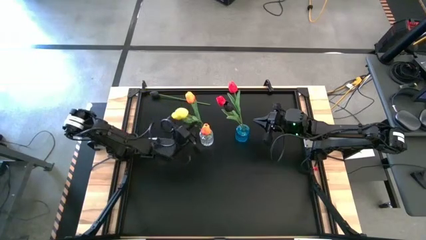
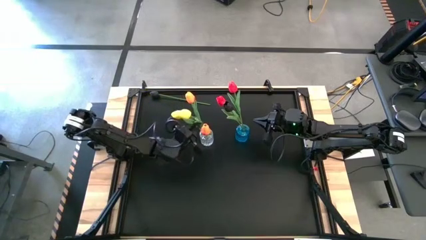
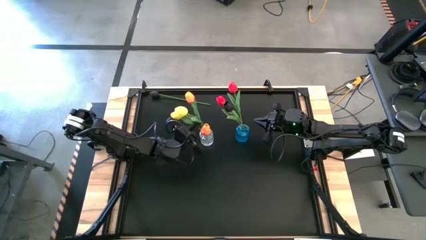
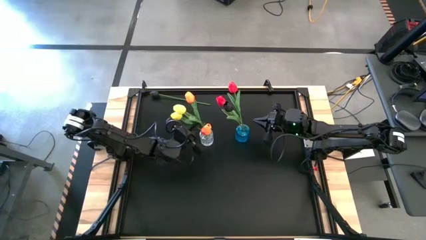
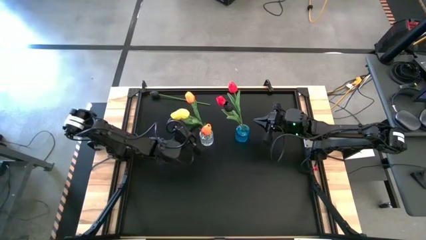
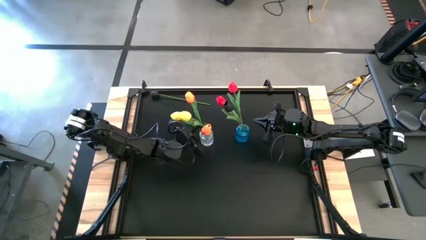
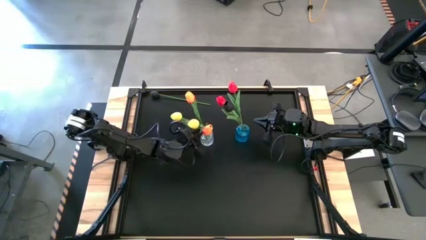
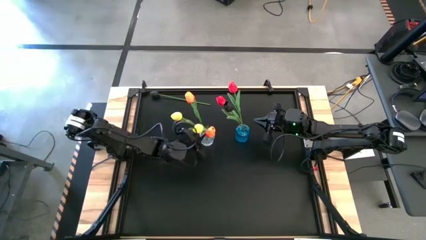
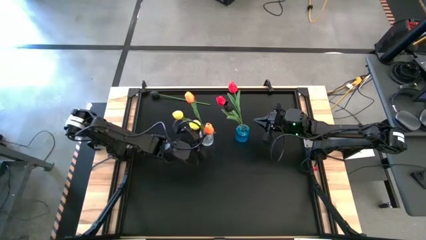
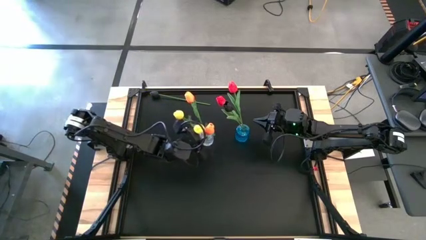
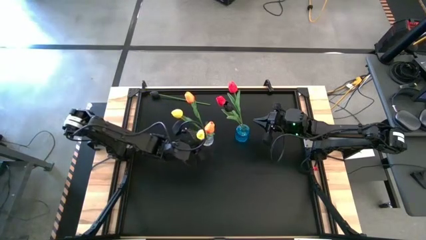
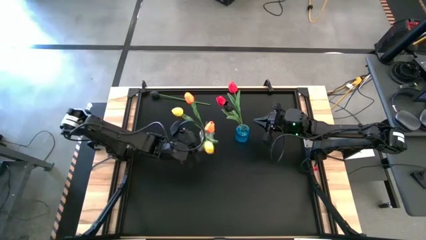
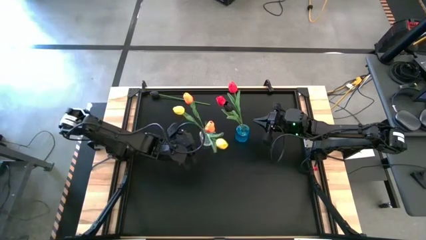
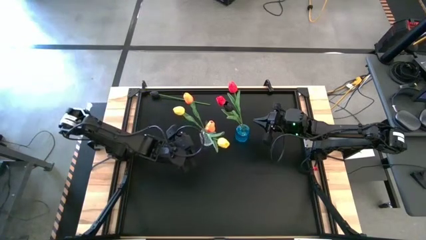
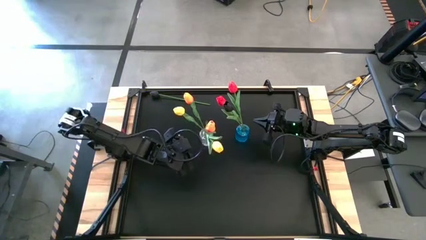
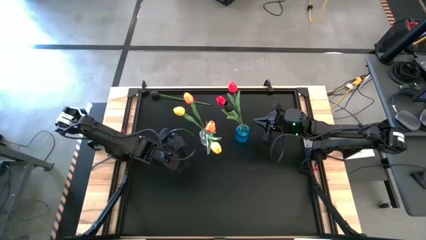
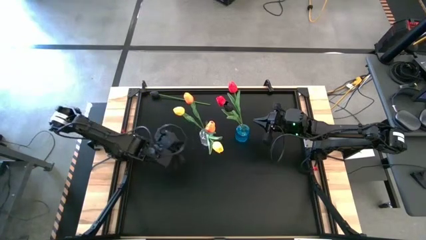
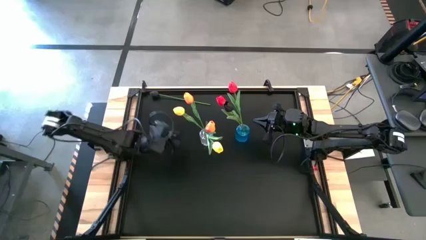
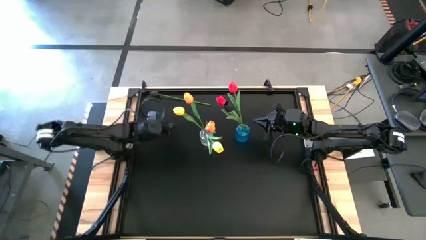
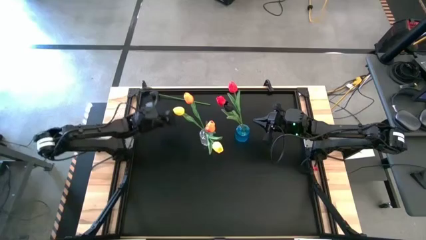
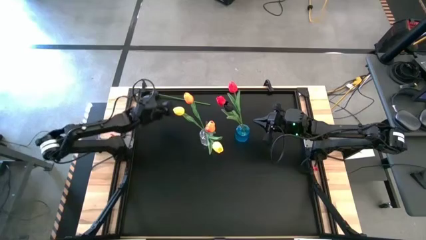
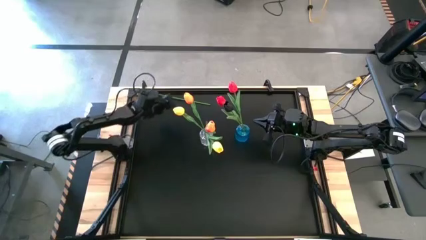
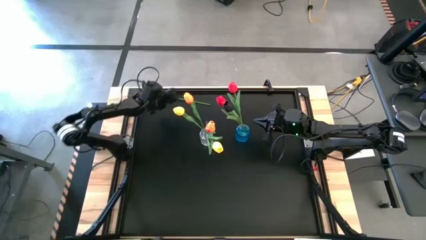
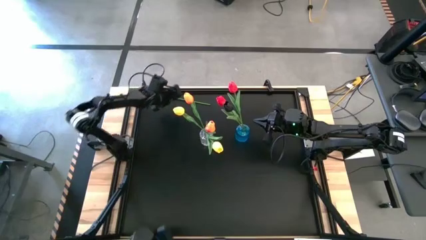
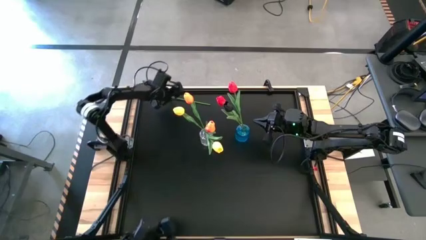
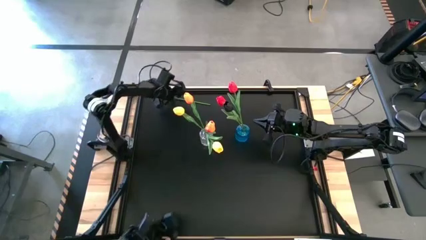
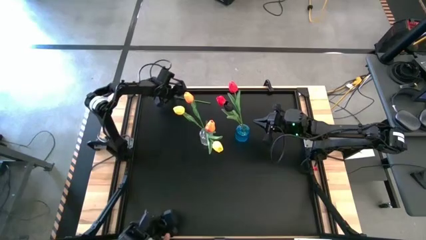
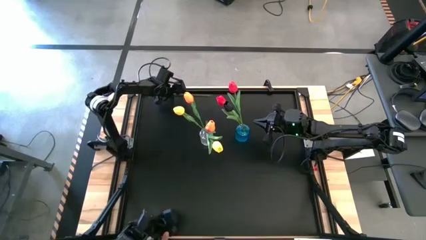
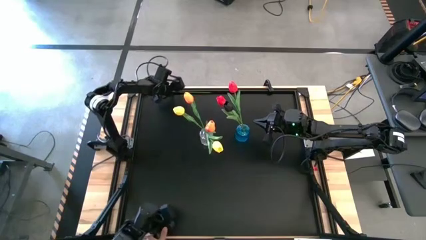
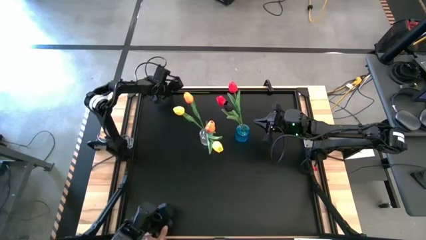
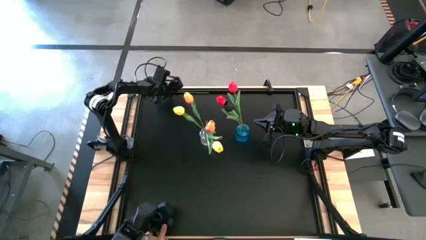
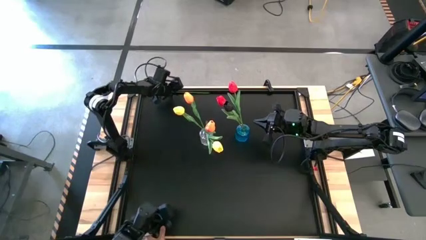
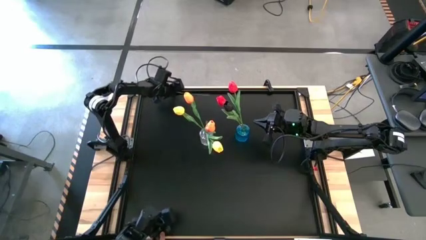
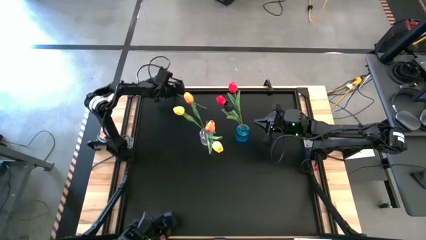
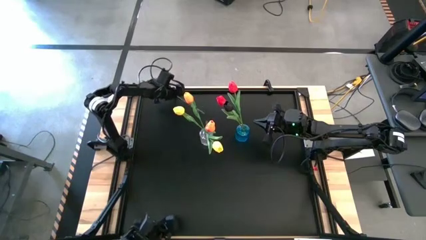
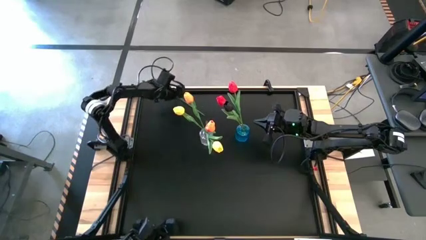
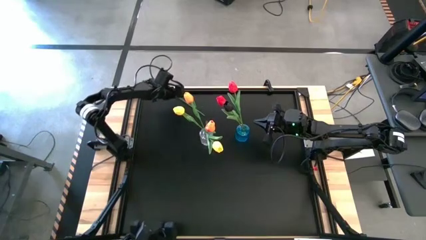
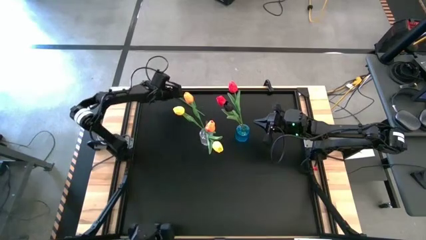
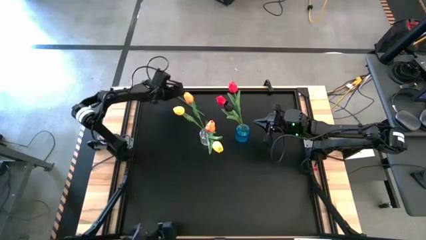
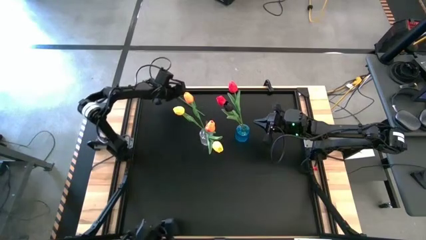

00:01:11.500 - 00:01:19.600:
Task: Sort flowers into vase by color
Put the black flower into the blue vase

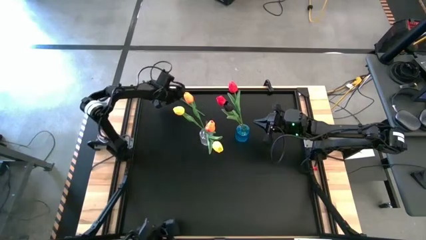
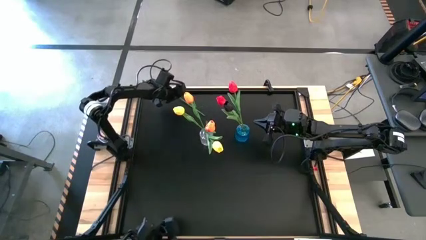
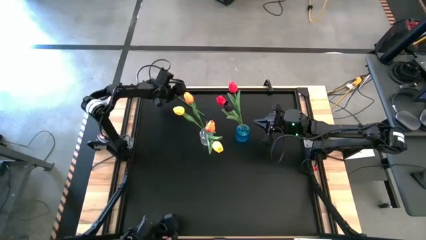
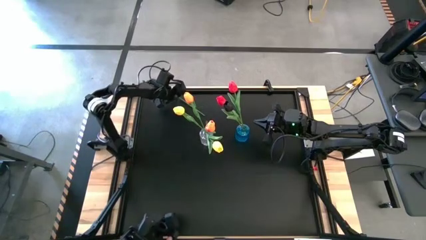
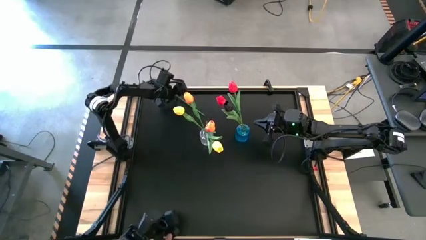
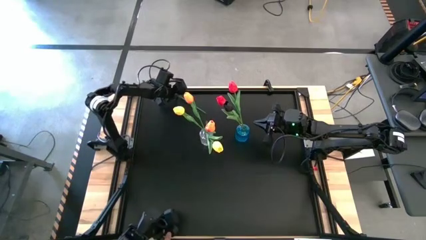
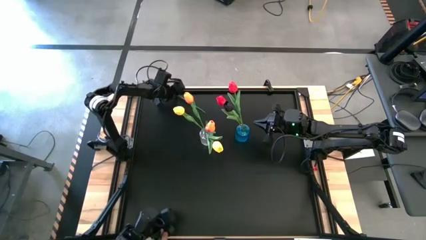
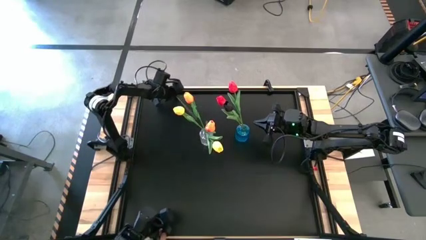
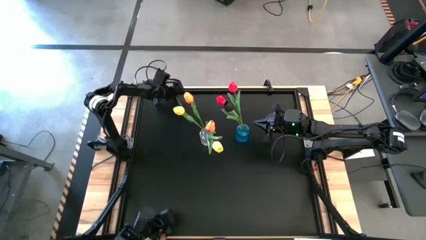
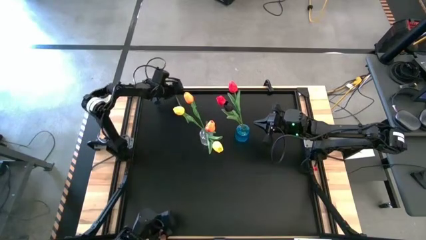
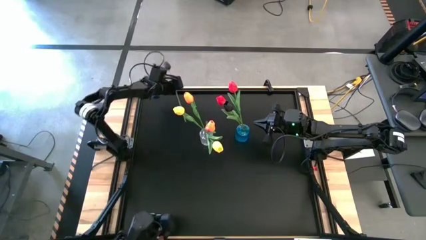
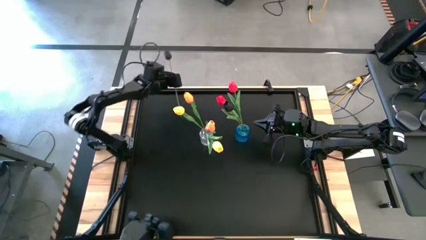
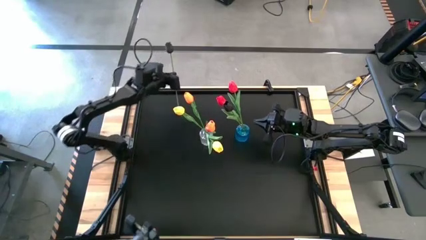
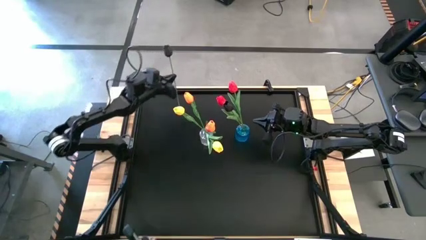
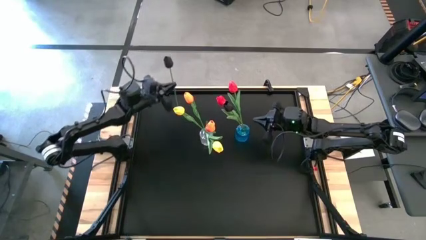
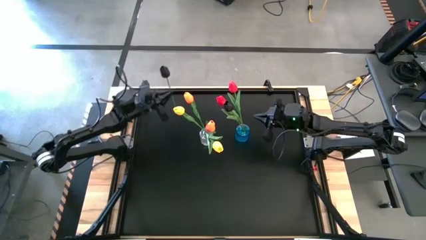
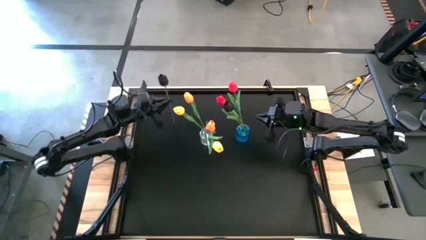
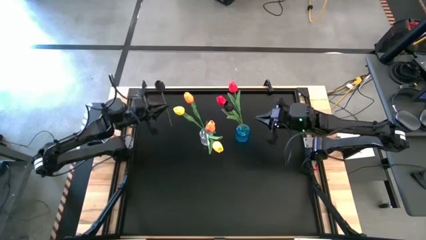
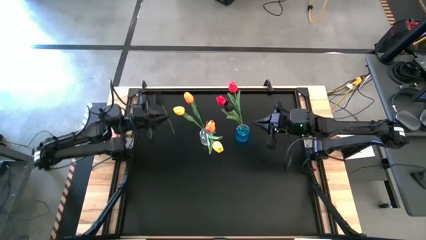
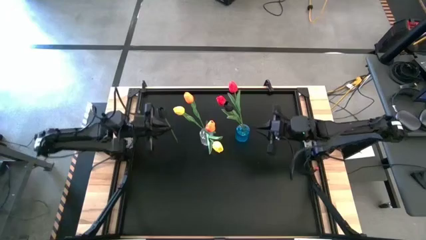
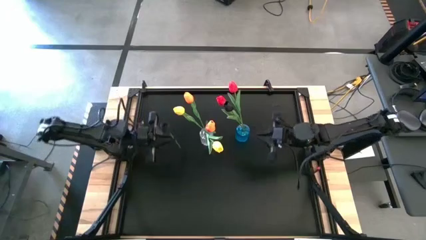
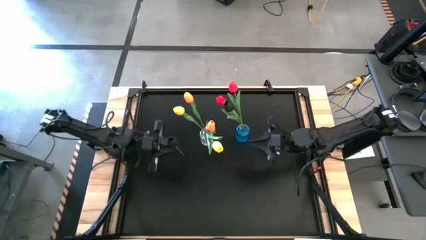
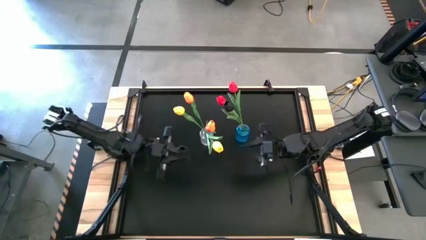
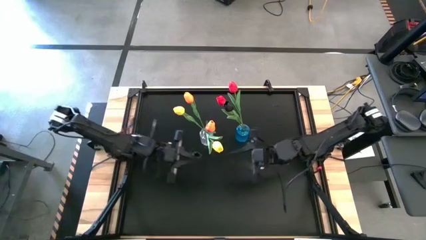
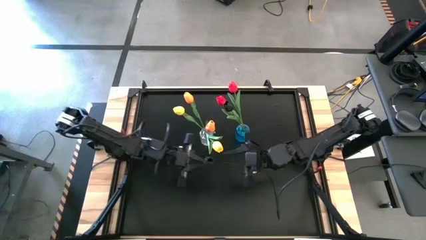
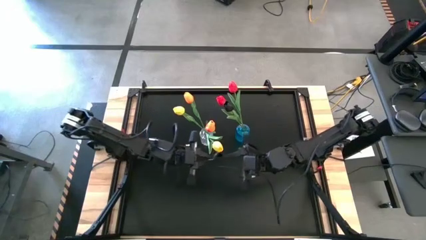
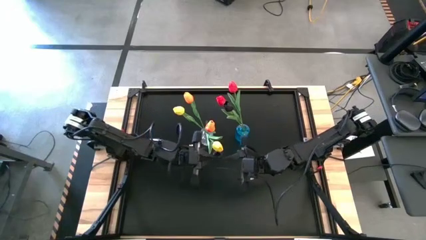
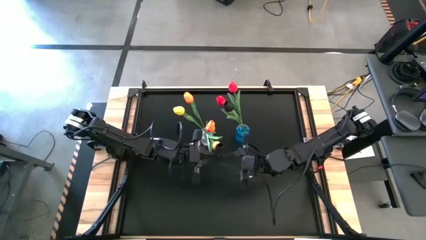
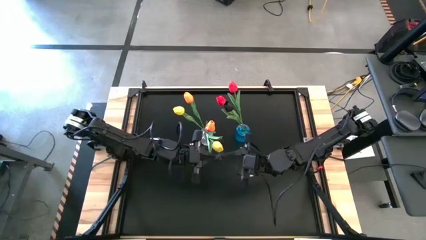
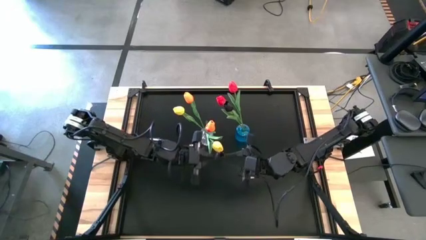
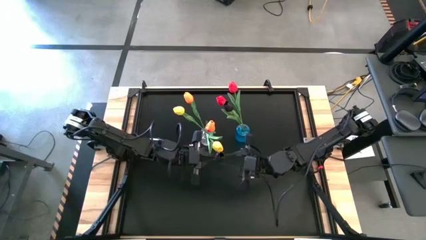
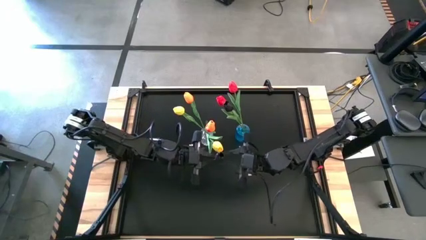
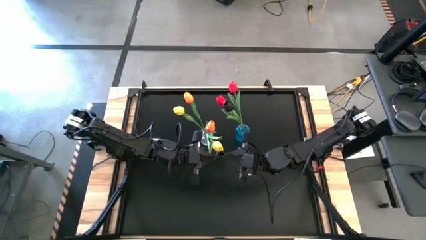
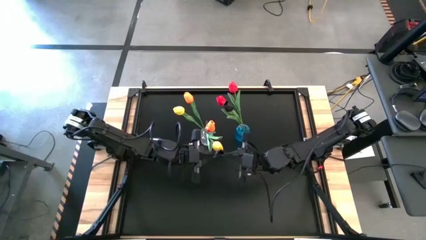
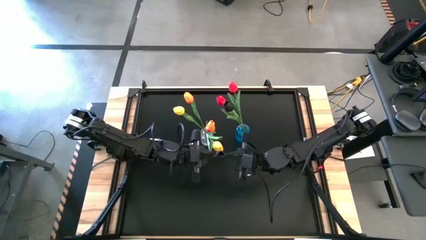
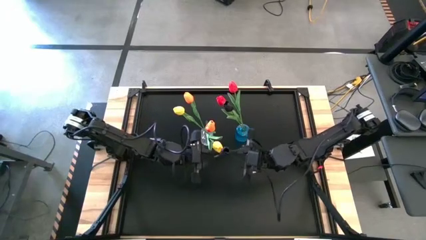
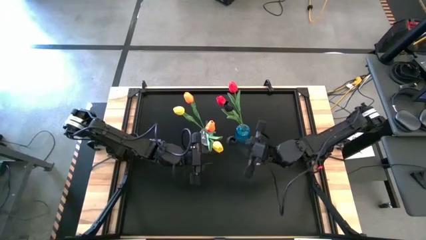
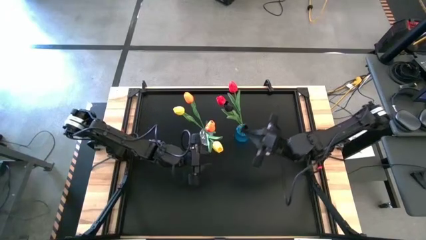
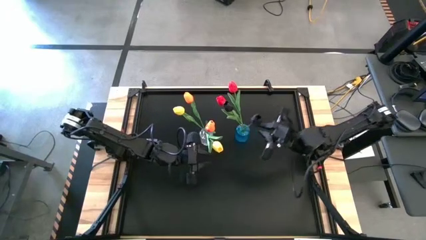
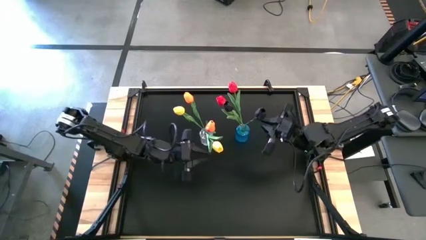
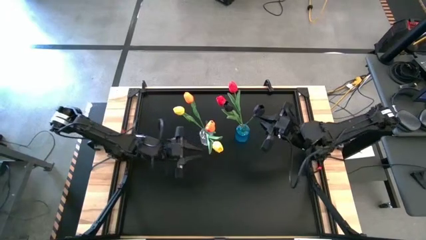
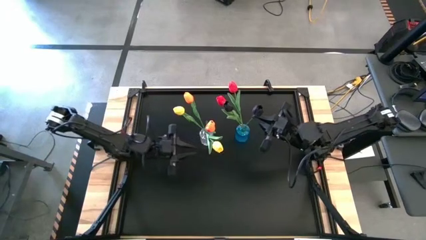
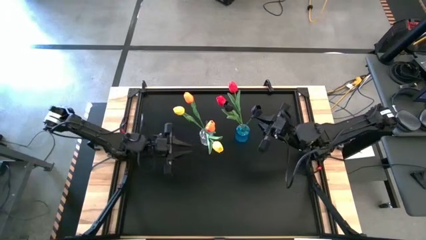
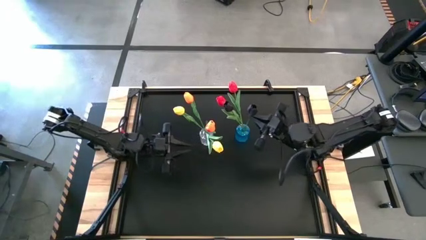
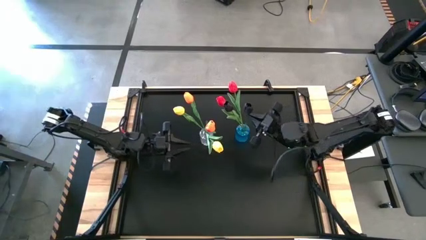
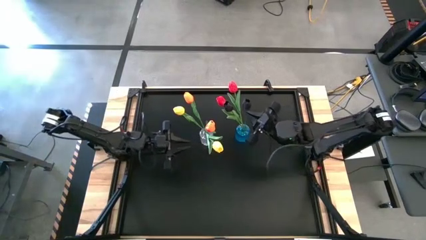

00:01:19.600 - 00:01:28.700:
Put the black flower into the blue vase
